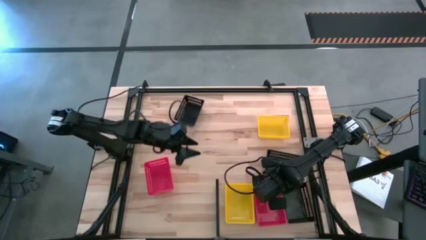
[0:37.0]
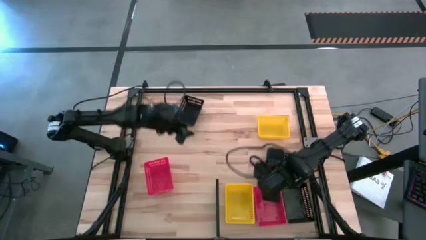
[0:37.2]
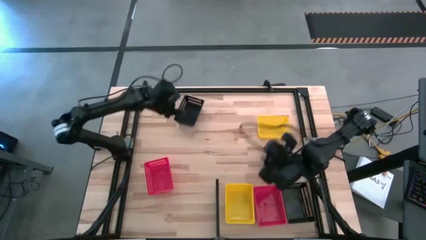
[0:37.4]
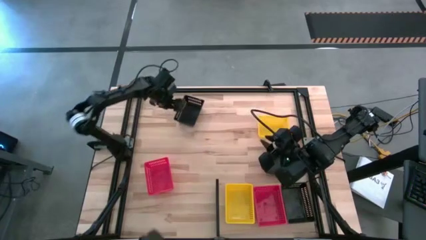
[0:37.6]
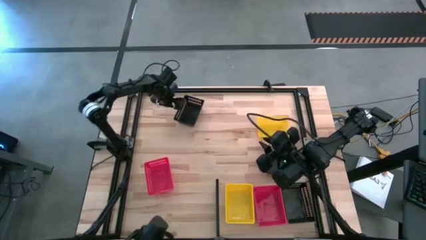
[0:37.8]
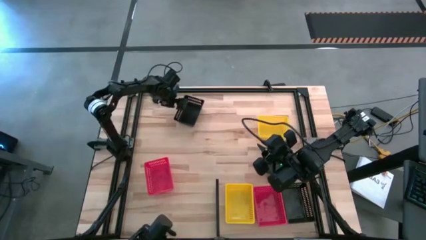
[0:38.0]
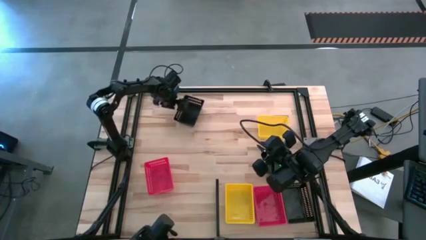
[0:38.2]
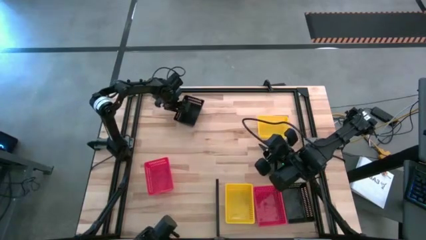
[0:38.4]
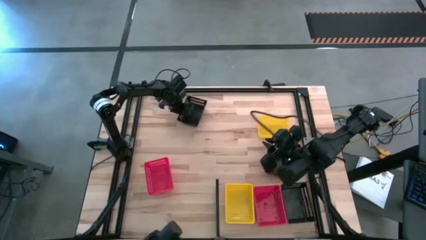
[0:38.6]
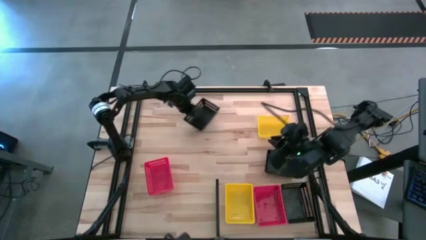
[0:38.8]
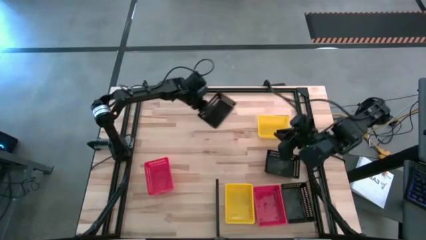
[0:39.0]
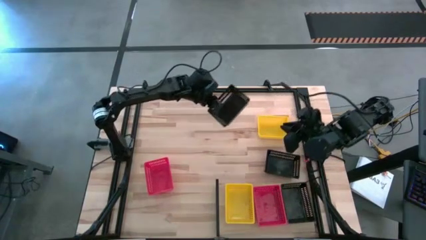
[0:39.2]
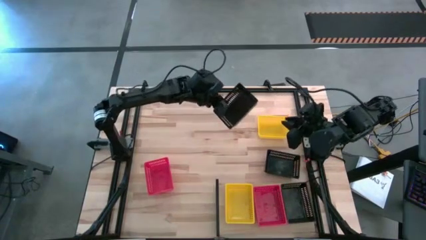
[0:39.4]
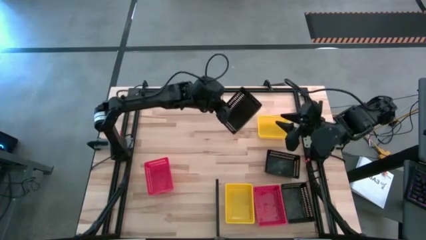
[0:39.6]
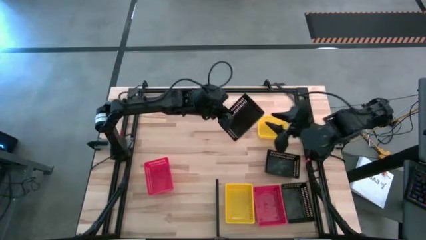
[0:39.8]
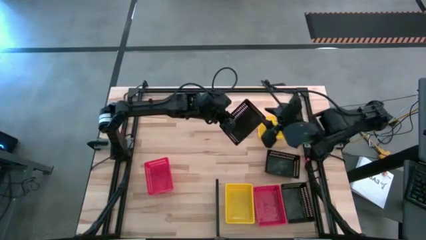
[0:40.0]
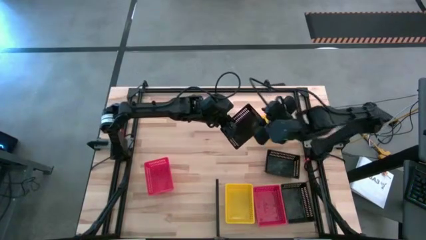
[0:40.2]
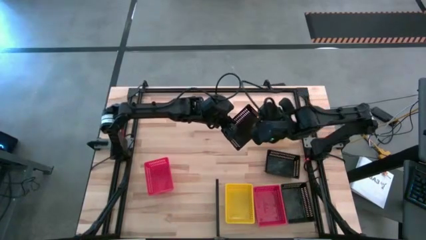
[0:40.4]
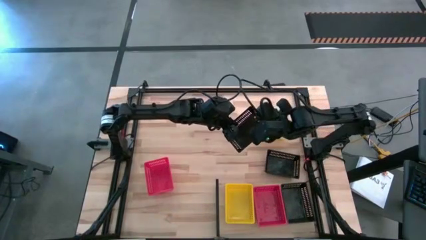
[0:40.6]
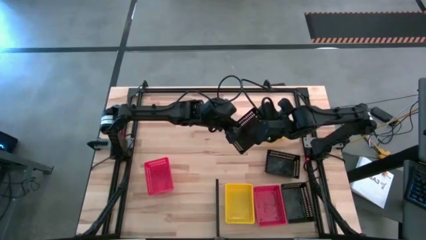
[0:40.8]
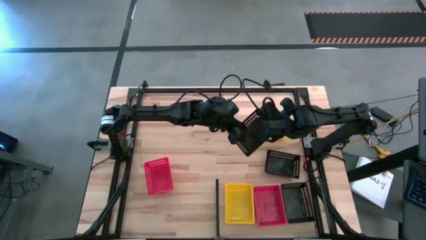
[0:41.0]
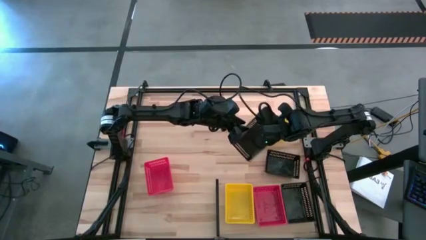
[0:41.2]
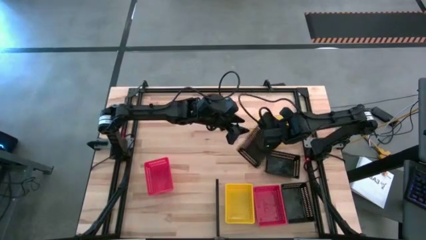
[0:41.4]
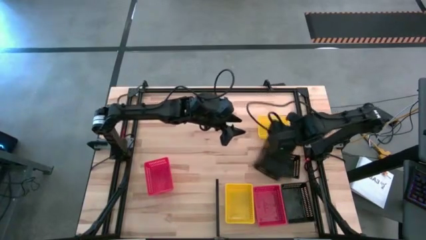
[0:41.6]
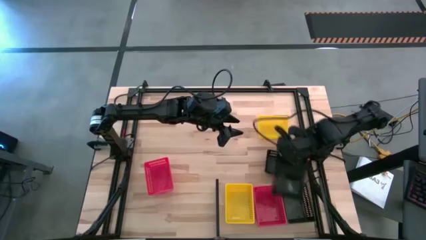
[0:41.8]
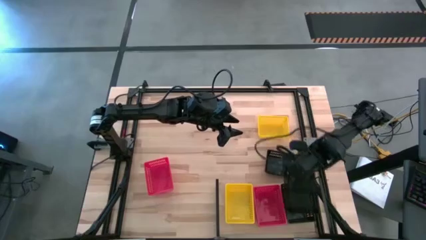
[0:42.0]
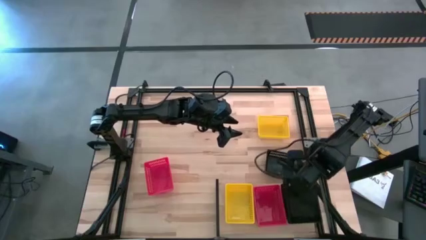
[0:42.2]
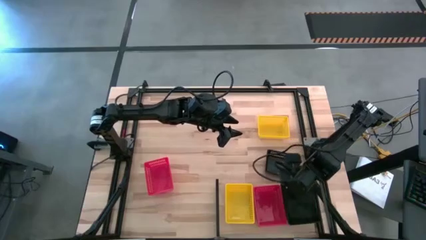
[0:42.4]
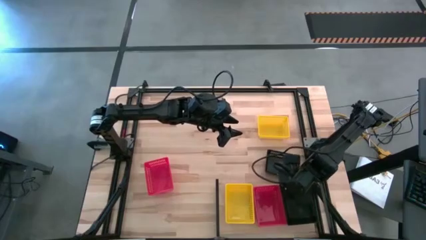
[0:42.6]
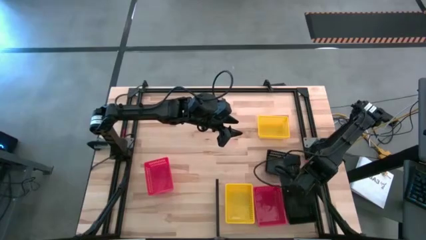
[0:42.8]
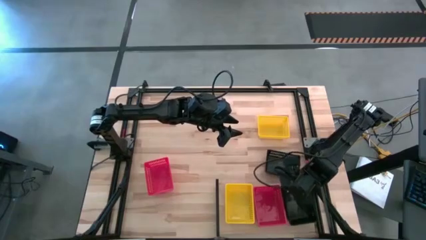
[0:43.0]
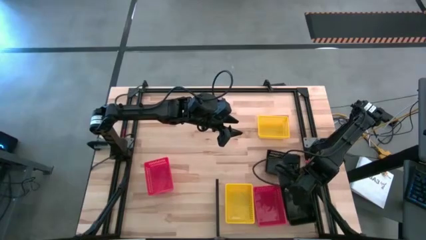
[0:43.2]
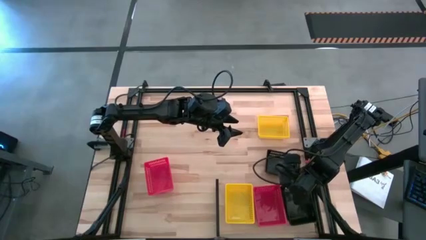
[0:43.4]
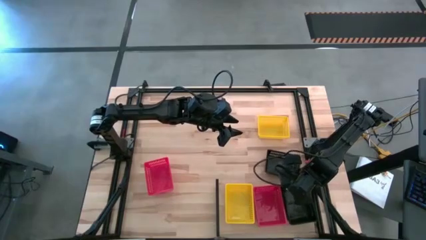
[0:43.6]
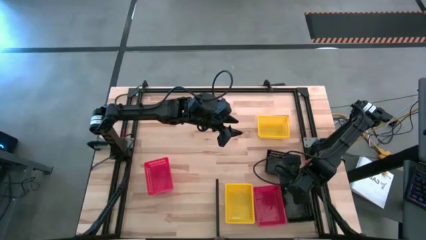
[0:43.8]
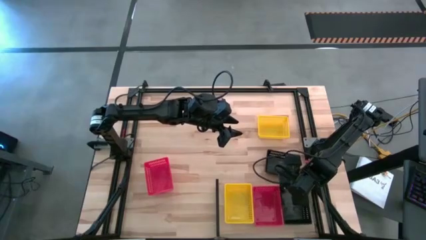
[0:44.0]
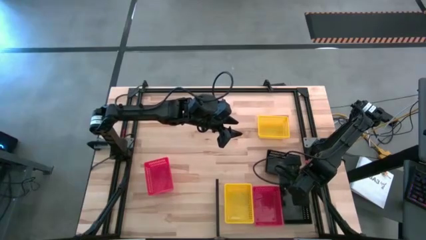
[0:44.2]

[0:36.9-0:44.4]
Task: Stack baskets on shelf by color
Stack the top black bin on top of the black bin on the shelf

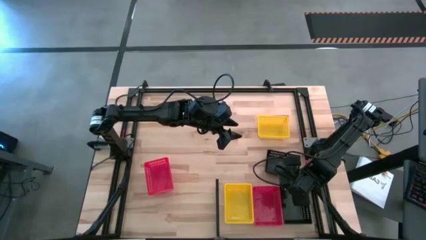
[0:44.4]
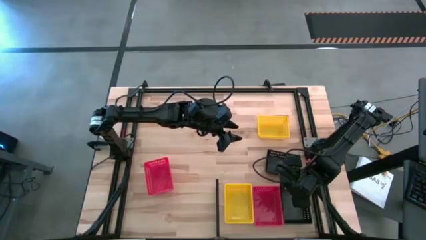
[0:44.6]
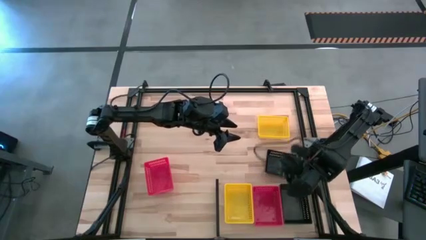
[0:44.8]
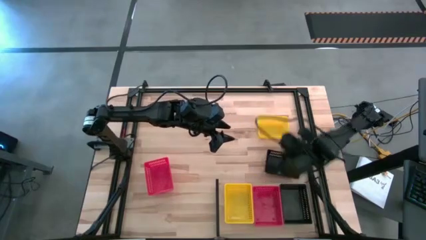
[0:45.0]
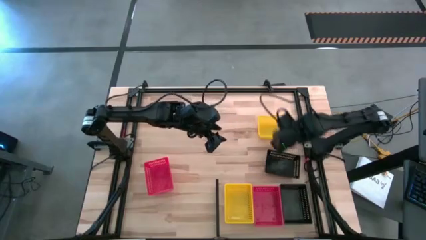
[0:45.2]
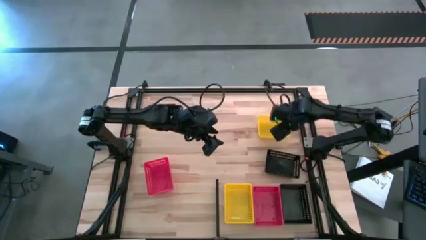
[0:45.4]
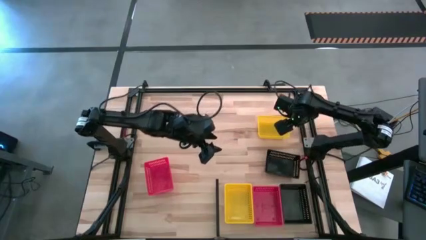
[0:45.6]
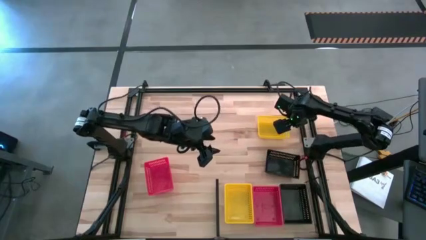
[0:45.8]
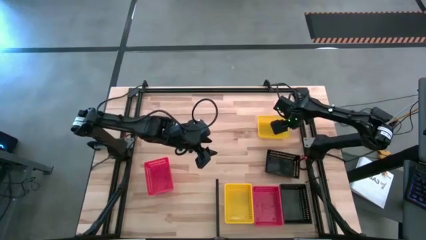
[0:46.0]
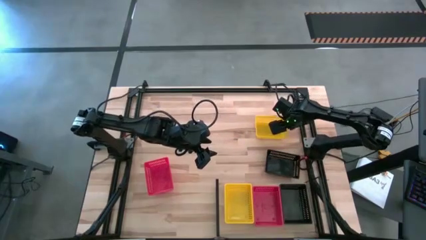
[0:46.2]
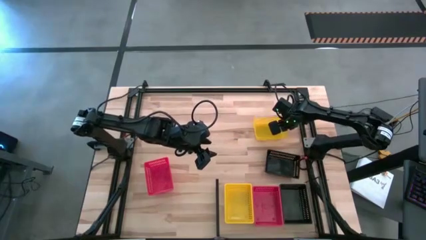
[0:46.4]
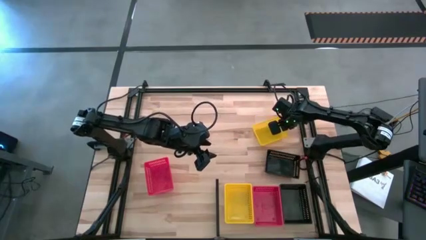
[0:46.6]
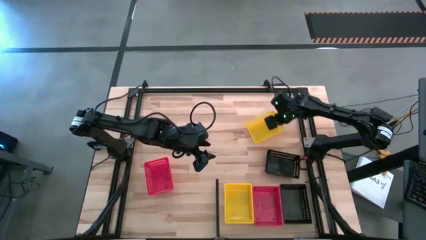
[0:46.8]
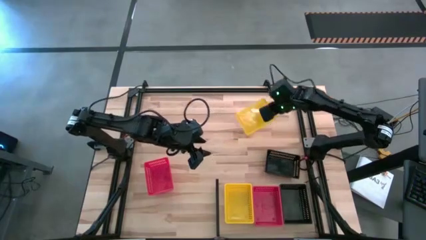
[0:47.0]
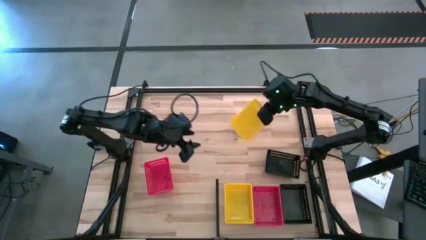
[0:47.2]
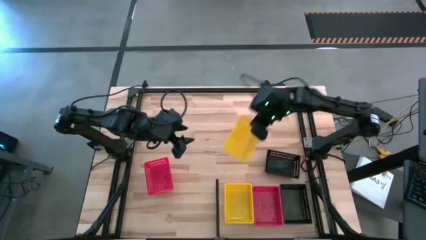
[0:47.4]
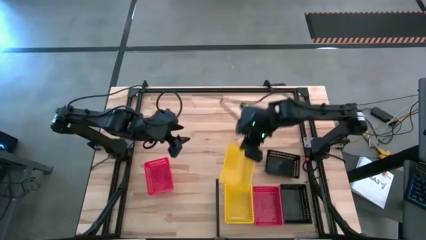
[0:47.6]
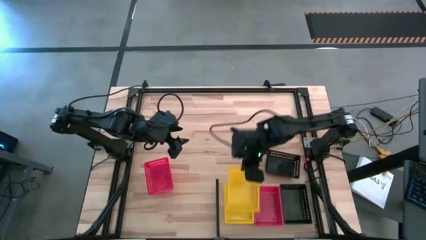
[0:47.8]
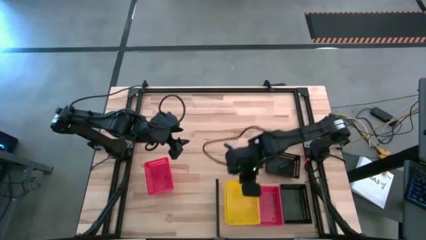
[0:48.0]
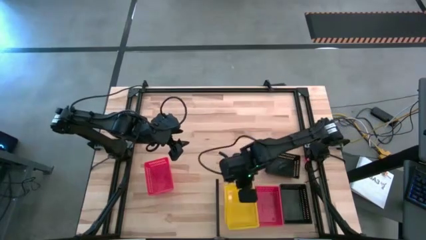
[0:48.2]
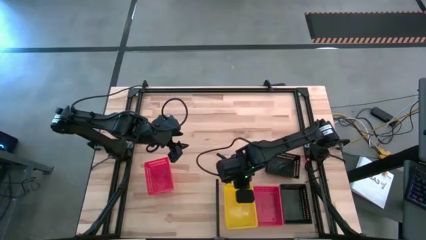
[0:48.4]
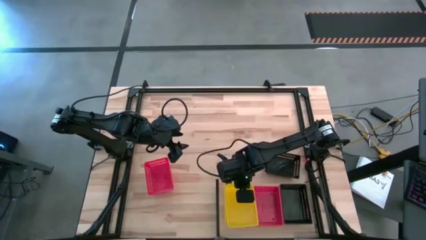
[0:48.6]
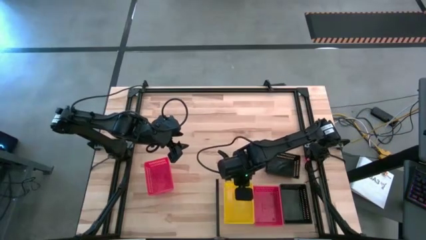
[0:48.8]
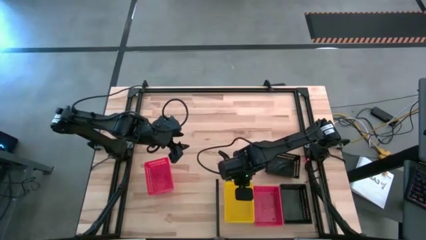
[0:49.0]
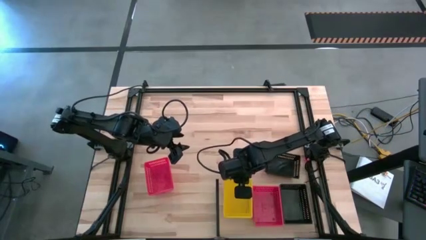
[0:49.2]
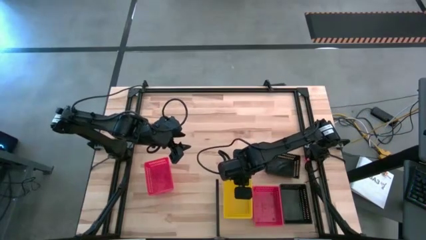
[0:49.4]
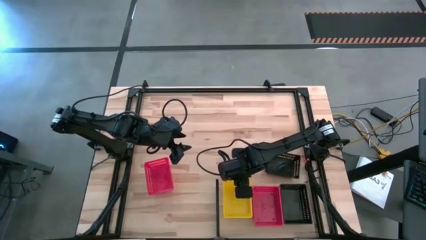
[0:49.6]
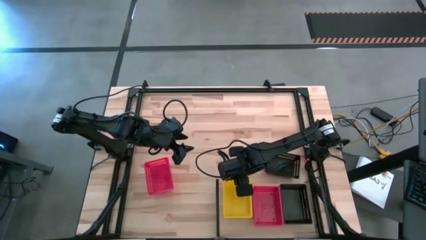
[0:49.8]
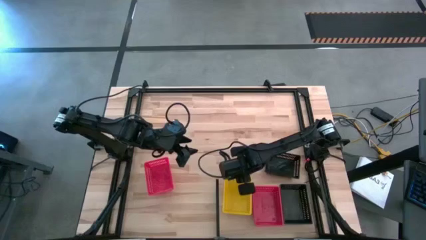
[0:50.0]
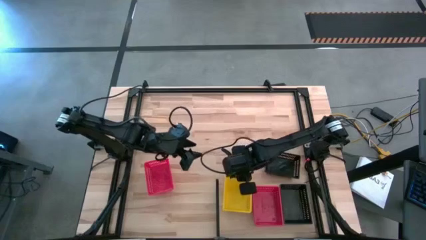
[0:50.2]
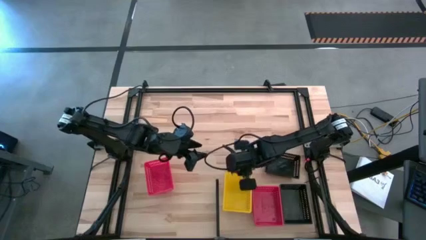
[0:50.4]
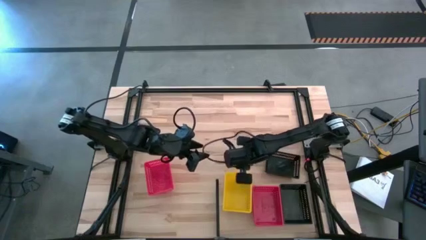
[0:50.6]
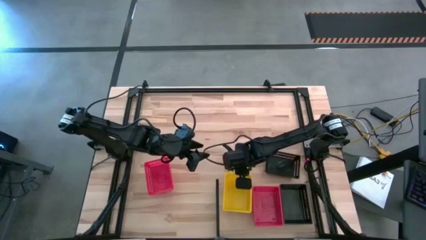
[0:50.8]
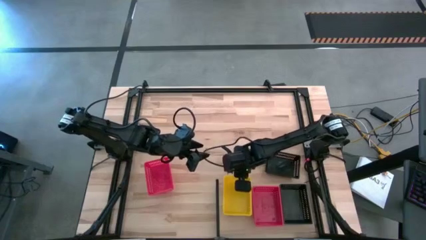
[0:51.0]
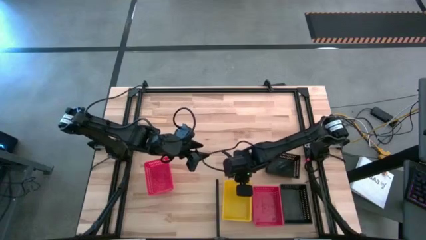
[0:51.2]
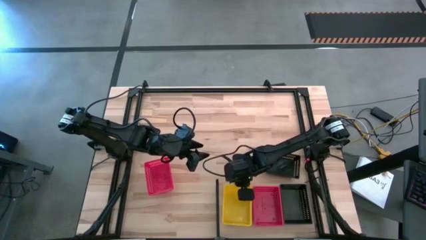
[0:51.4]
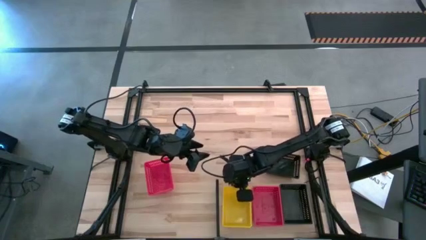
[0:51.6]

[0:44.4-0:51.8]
Stack the yellow bin on top of the yellow bins on the shelf

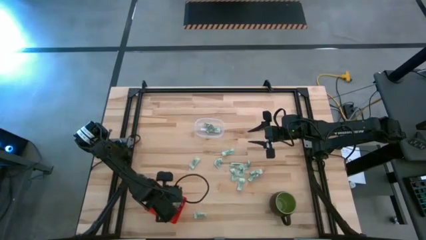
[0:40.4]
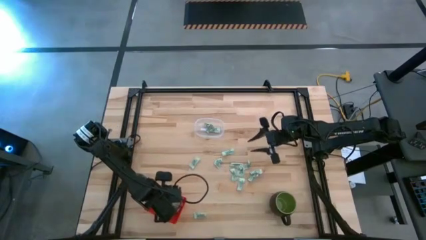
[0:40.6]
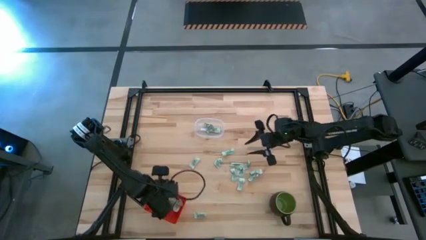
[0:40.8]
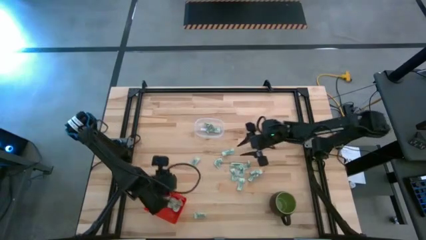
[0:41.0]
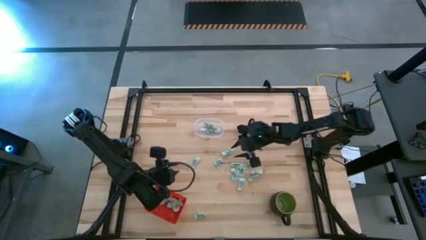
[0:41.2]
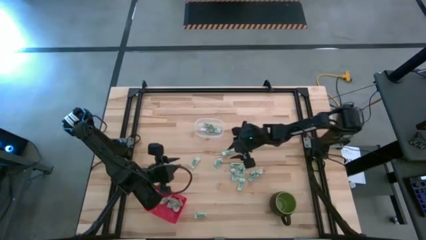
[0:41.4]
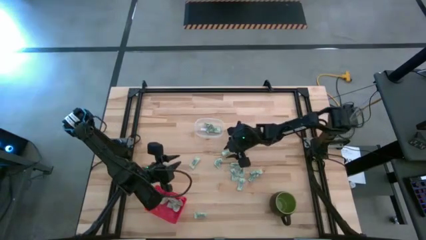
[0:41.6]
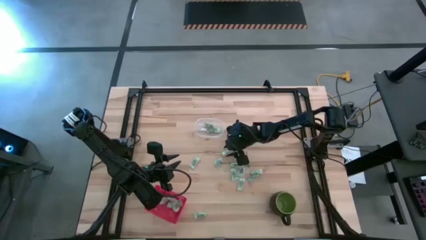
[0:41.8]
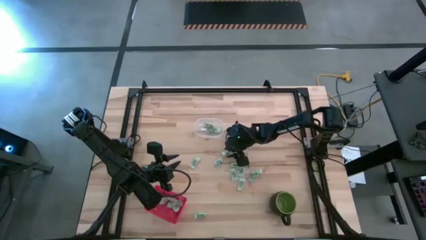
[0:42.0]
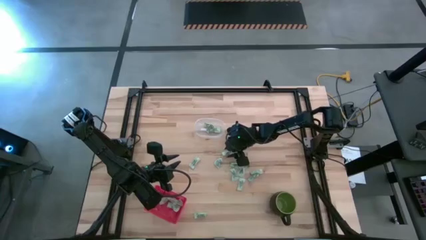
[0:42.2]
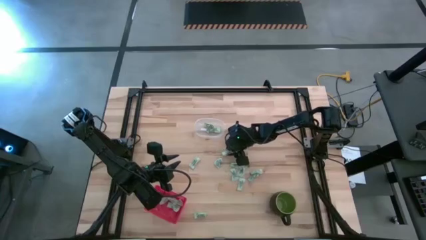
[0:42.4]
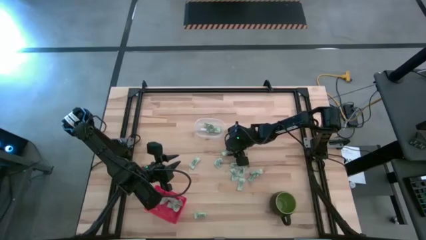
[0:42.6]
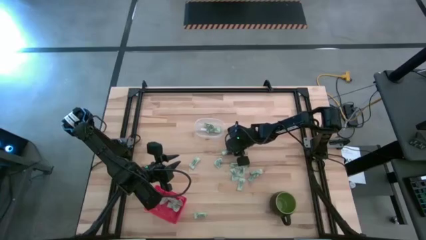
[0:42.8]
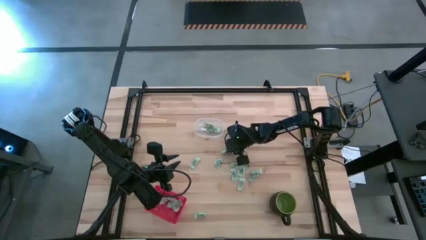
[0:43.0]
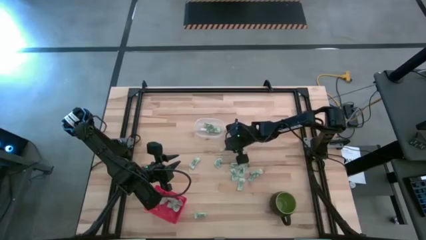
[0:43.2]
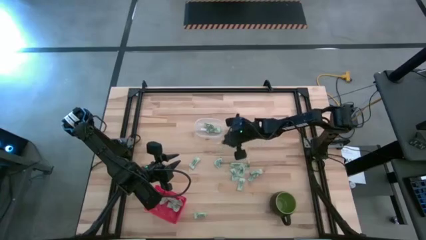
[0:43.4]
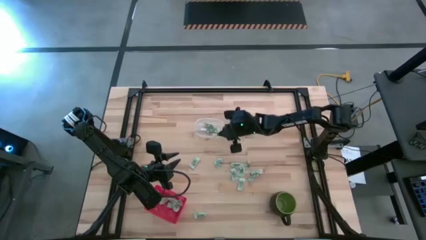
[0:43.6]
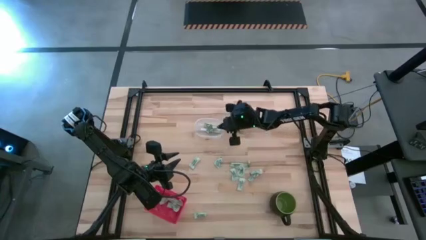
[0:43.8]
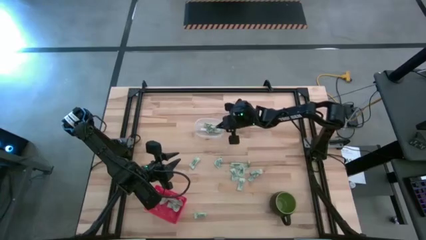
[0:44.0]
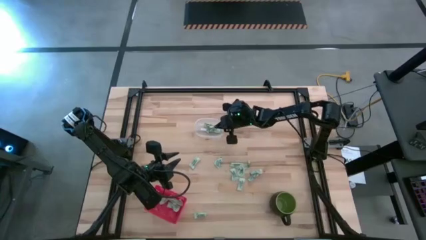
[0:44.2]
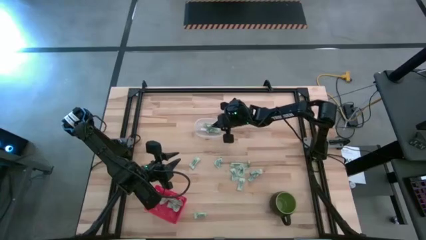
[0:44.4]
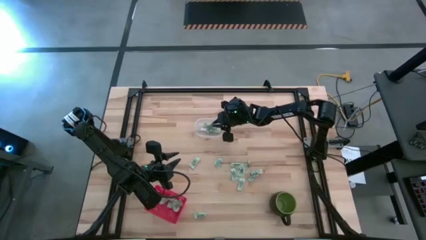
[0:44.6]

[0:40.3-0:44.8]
Task: Pick and place items into bin
Put the stevia packet into the transparent bin
